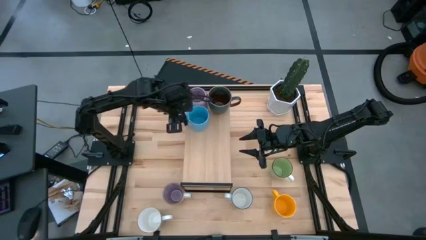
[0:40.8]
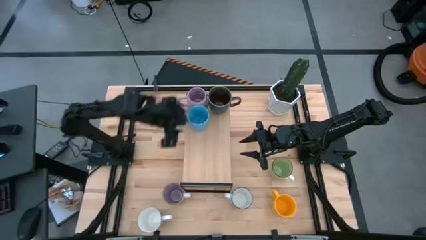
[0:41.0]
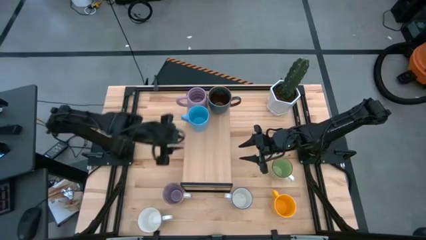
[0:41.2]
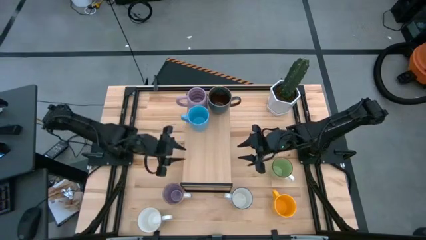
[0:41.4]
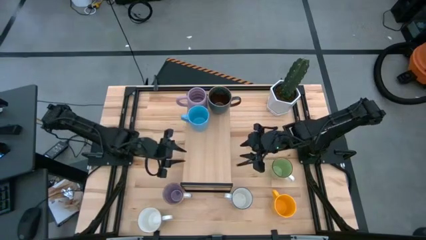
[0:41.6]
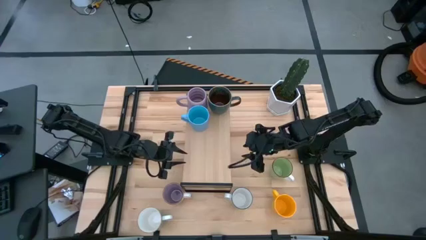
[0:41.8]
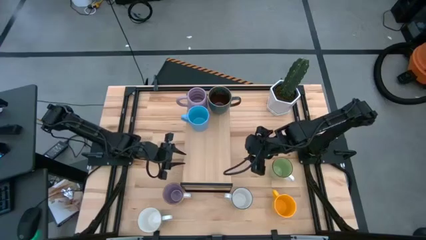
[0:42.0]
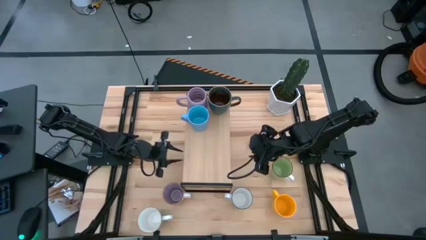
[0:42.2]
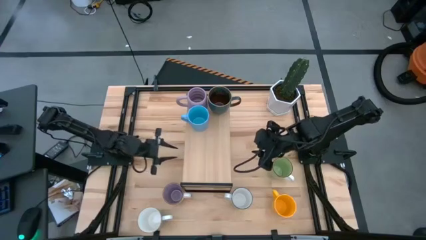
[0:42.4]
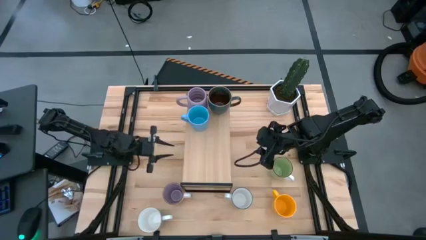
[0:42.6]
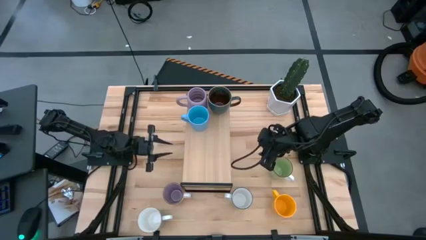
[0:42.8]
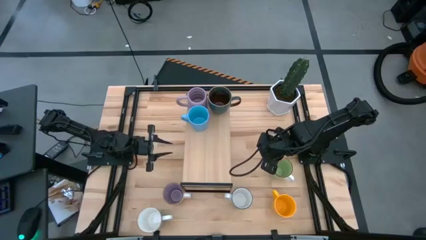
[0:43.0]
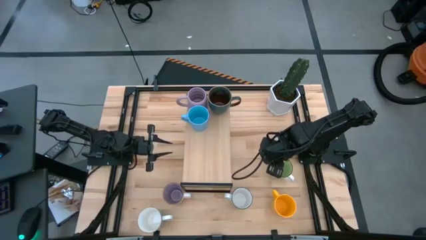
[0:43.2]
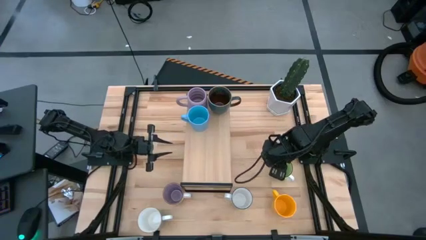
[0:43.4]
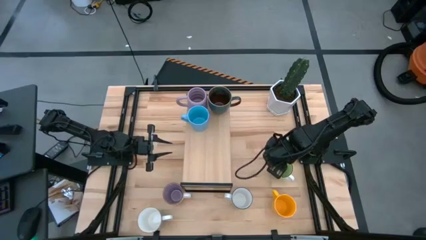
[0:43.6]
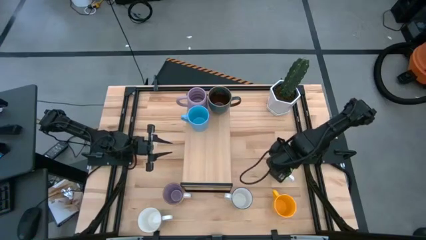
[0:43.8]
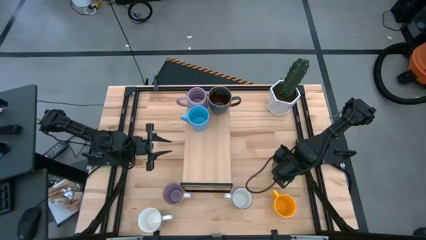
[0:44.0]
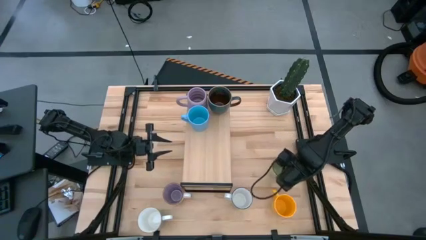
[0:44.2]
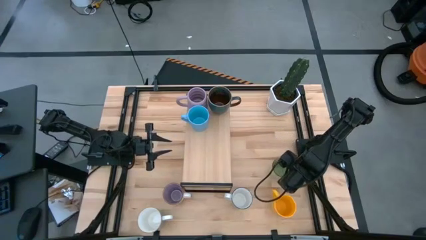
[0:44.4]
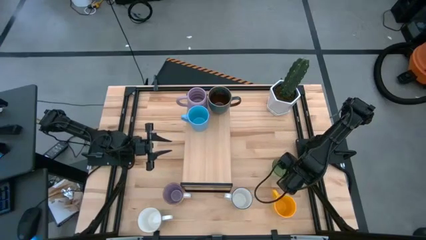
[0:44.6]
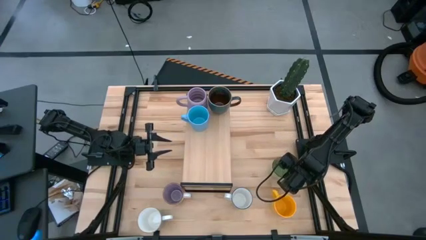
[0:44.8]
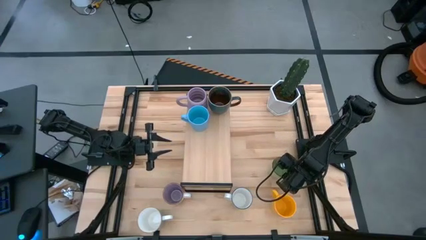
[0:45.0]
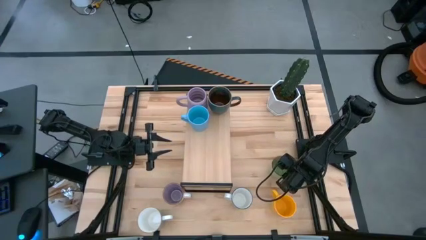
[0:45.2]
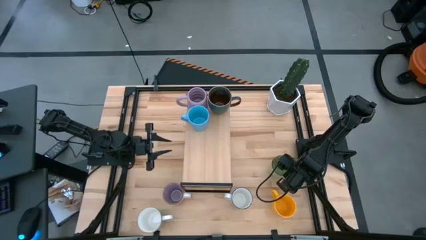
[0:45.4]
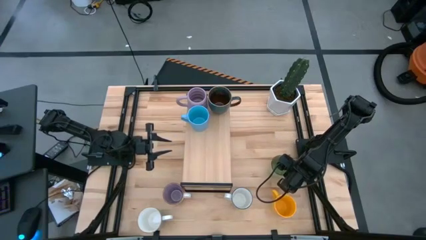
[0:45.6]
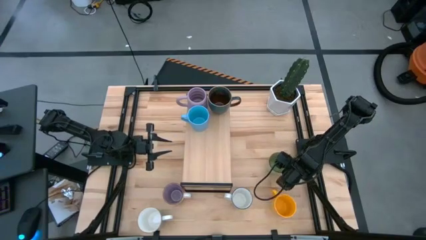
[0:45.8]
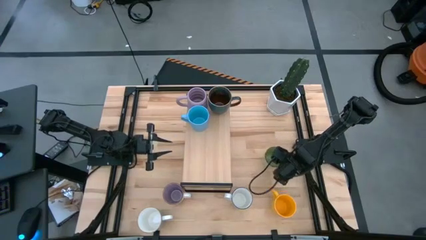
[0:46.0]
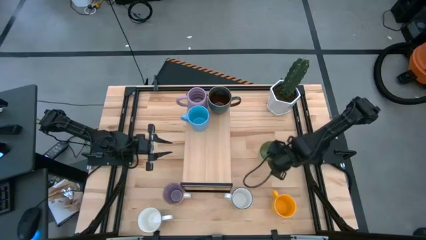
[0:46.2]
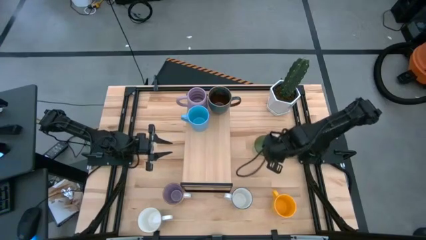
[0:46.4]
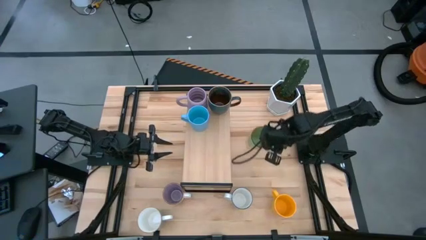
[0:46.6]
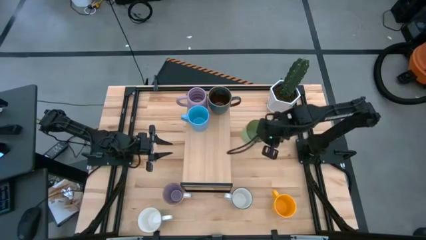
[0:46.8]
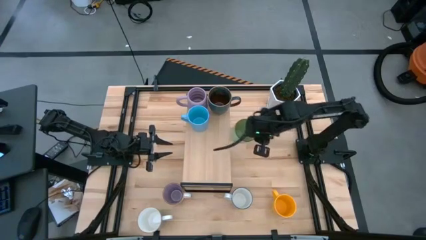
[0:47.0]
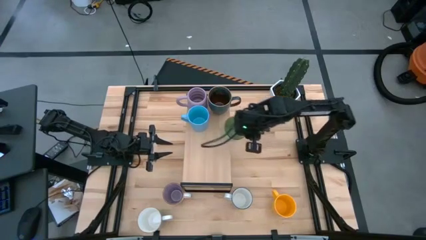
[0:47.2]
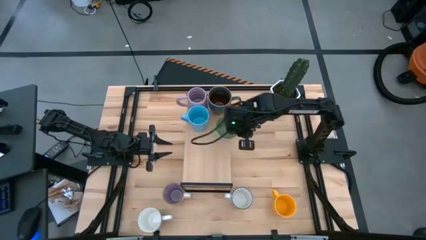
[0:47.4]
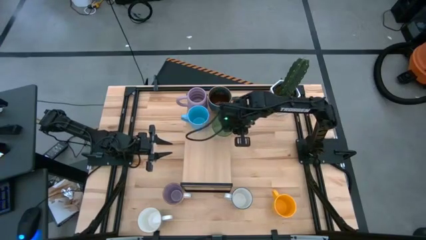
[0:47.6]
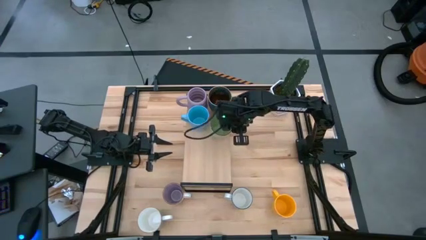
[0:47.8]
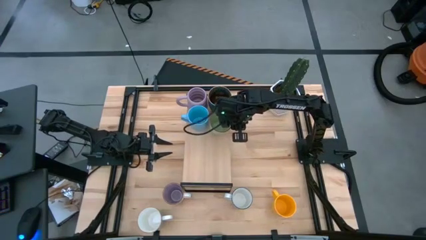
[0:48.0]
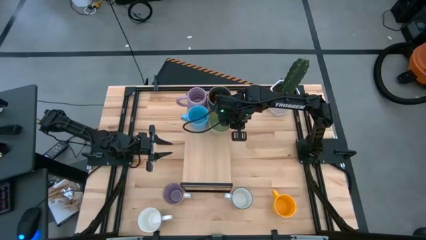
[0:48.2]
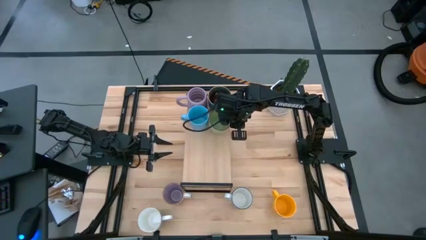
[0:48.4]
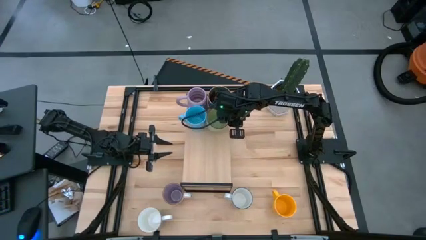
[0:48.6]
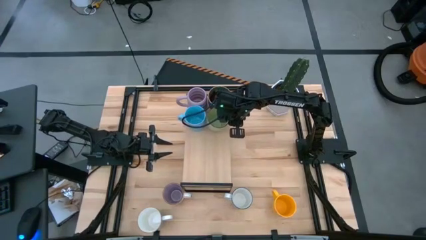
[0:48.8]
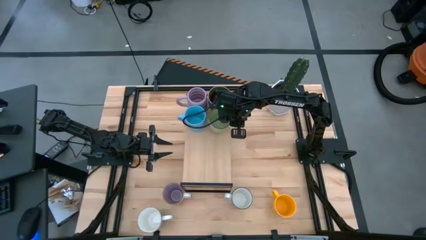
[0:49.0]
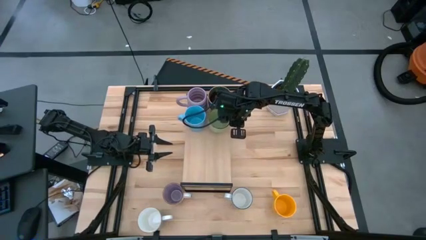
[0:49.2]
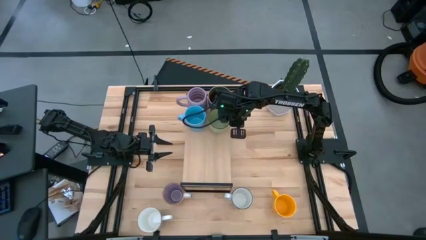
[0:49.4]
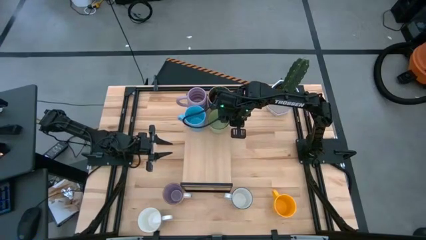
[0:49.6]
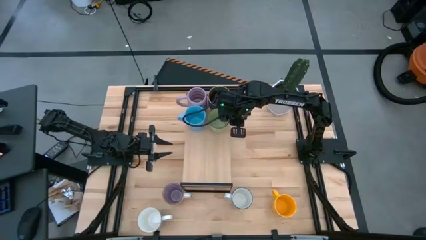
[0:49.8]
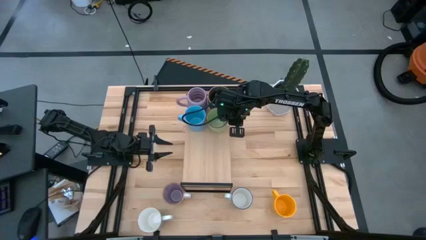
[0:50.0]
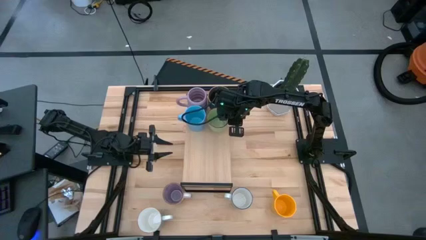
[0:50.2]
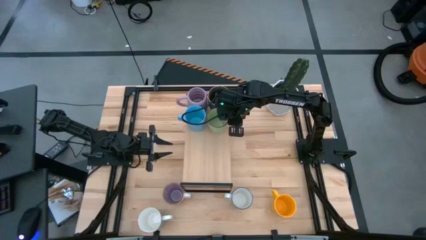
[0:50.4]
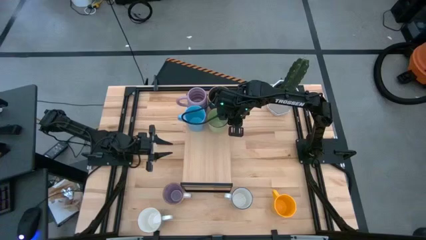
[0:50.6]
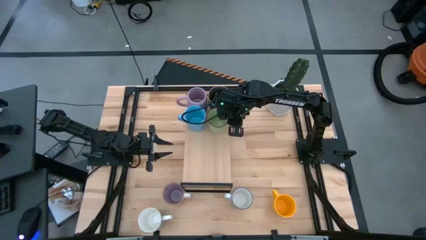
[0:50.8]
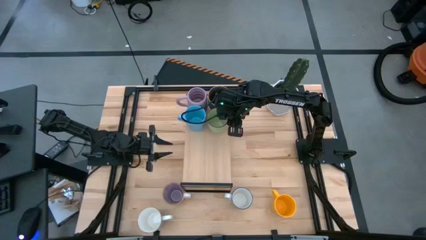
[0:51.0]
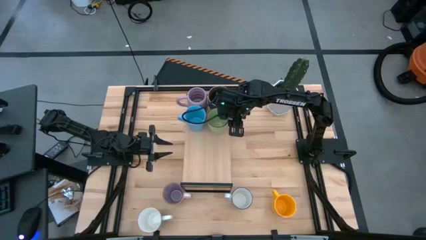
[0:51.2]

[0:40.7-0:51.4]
Task: Place coffee mugs
Put the green mug on the shelf

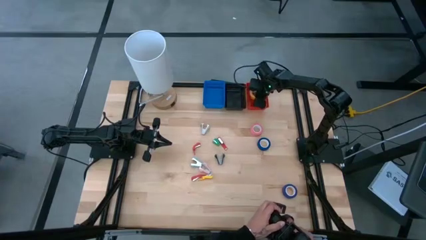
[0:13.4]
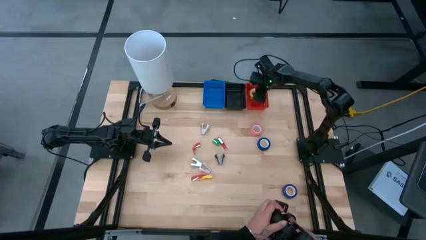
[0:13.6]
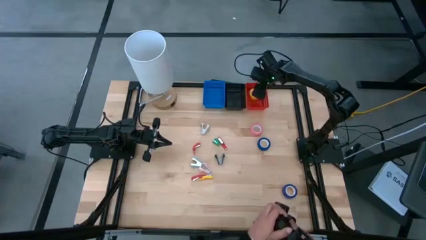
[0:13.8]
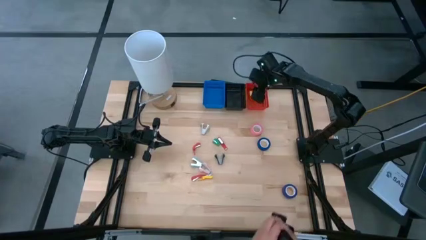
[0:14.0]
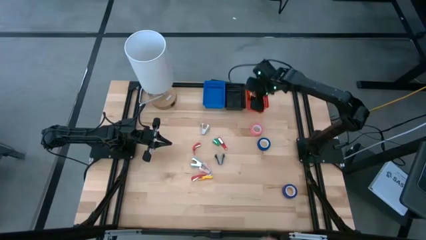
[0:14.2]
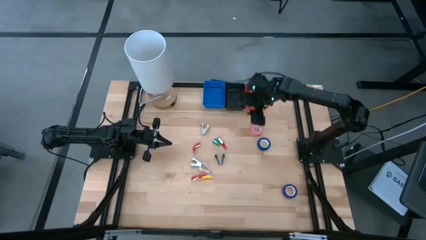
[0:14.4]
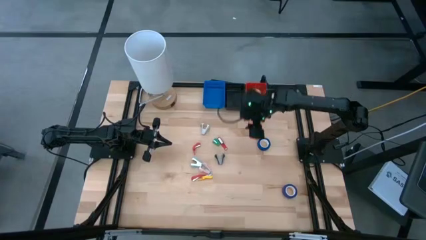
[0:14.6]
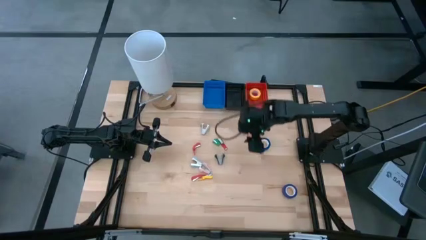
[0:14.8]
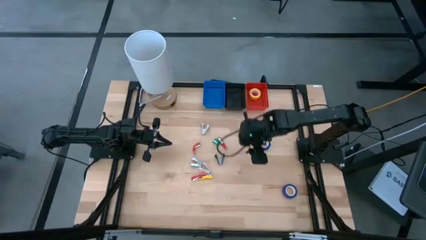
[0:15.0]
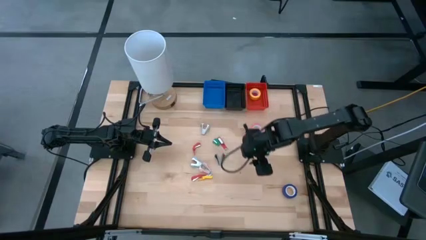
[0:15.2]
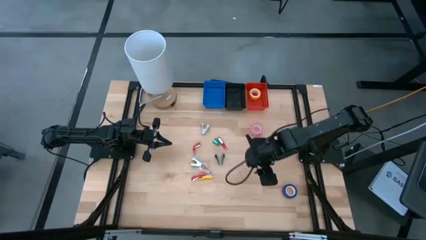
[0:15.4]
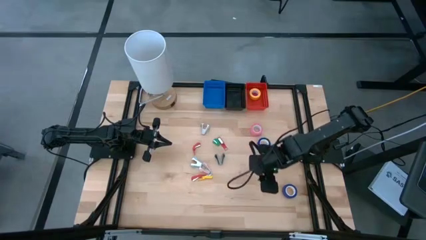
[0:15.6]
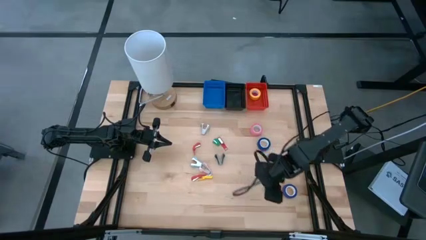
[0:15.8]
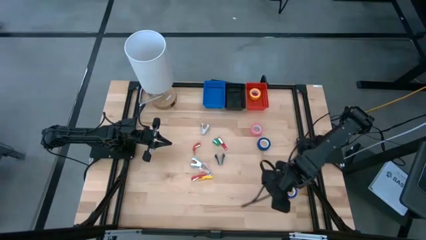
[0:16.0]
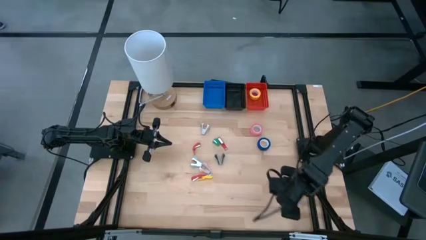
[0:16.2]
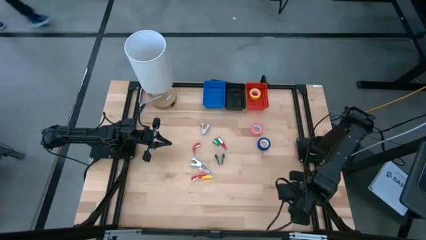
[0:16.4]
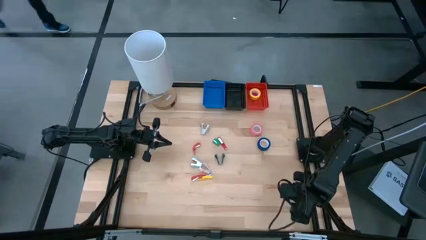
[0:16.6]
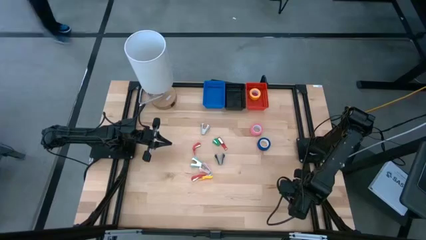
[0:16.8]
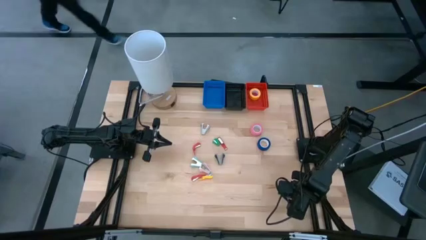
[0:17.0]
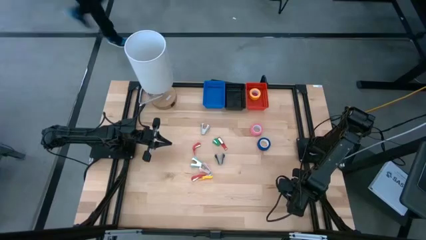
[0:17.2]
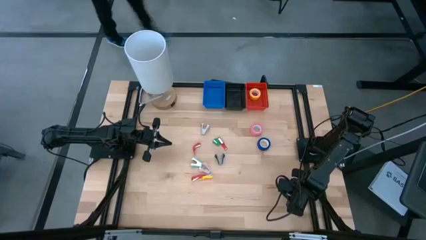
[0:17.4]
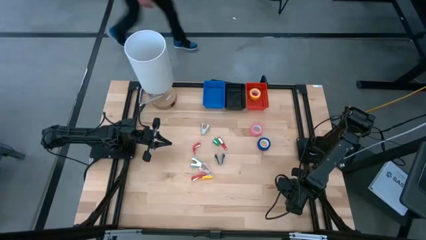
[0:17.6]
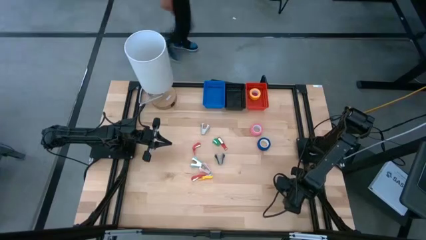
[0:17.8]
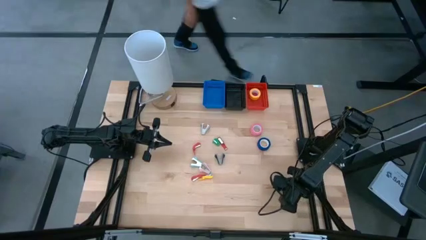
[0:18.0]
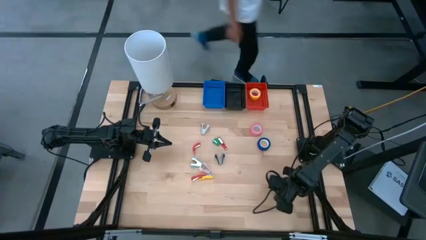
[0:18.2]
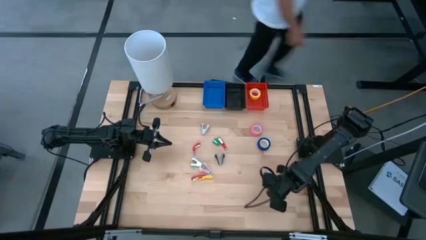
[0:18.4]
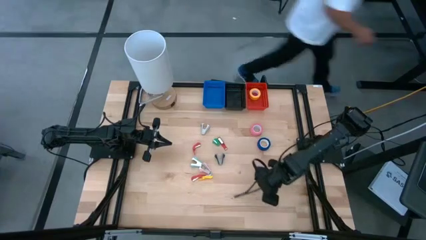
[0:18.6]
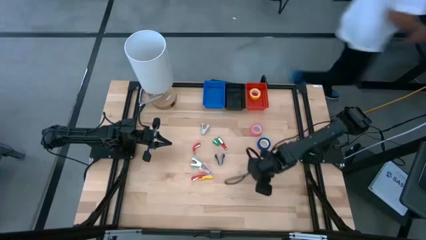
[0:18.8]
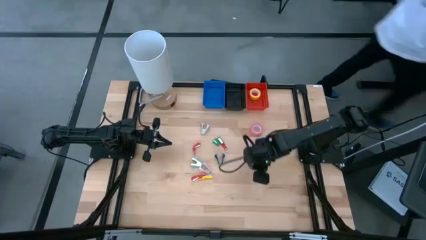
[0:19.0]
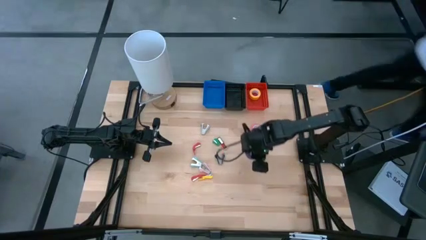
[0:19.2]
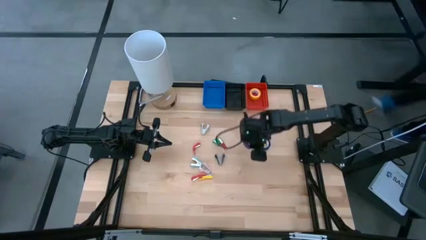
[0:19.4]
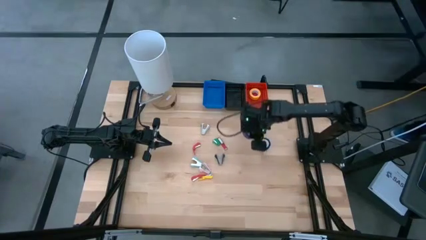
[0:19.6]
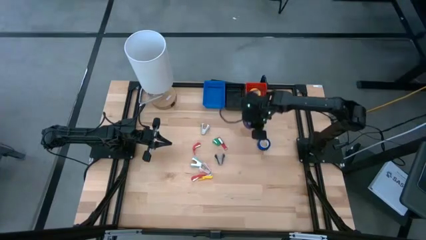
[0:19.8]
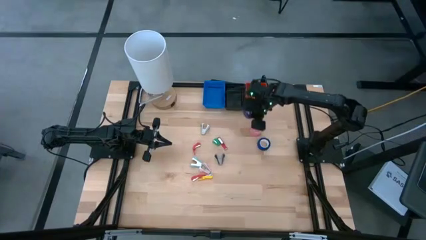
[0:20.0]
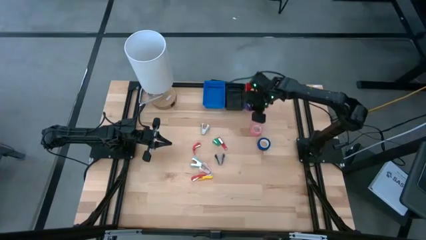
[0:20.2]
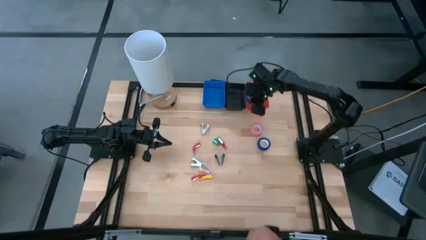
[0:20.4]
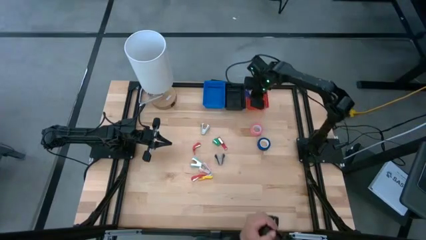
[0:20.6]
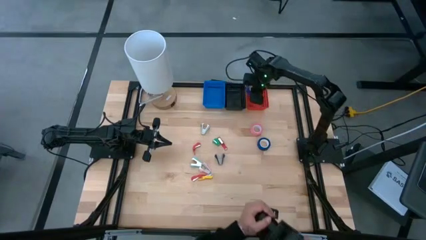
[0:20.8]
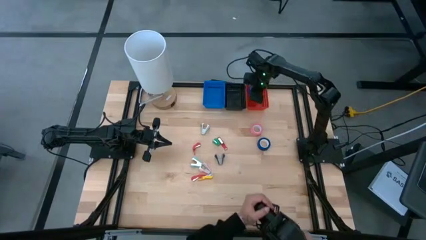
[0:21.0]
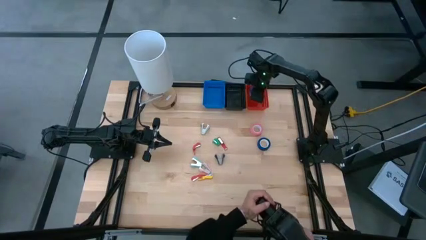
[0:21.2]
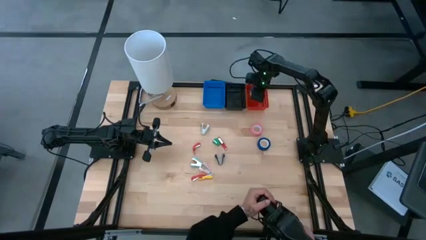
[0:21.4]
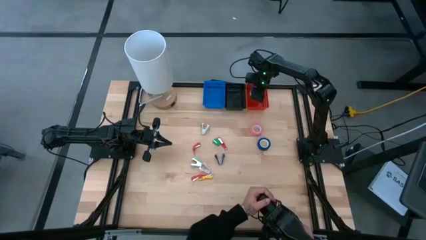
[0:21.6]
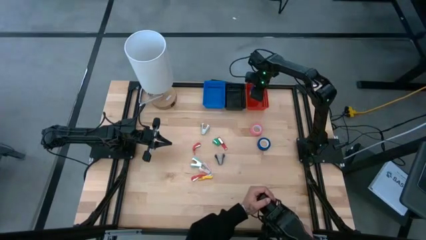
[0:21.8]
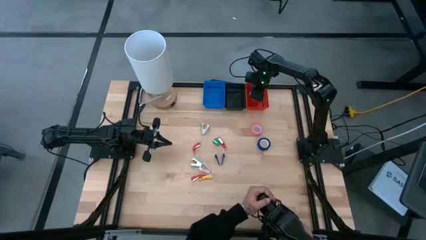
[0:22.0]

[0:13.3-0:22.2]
Task: Pick and place Stapler, Stapler remover, tape
Put the bottom blue tape into the red bin
